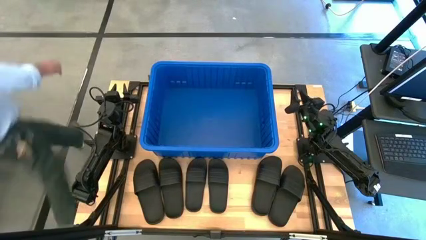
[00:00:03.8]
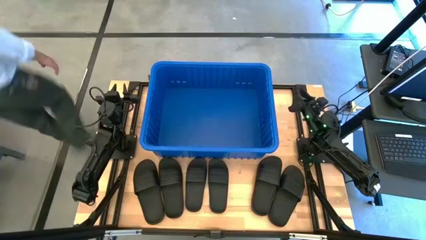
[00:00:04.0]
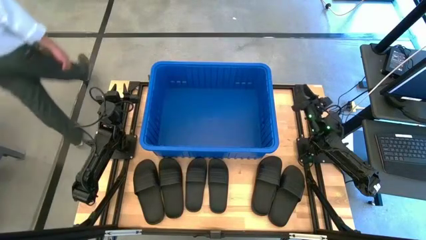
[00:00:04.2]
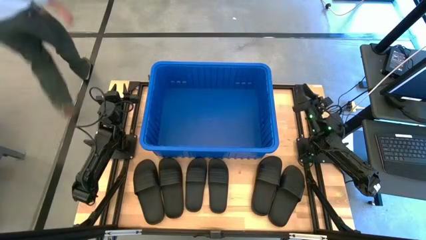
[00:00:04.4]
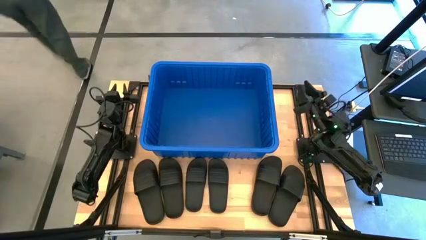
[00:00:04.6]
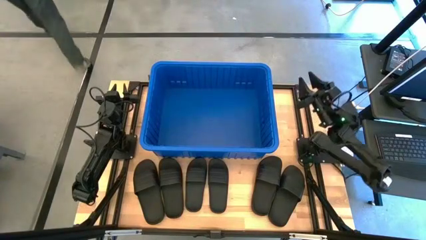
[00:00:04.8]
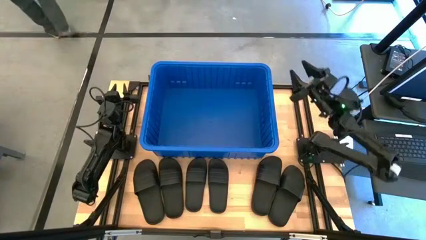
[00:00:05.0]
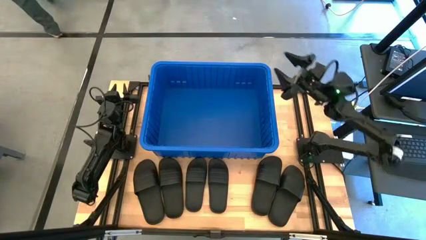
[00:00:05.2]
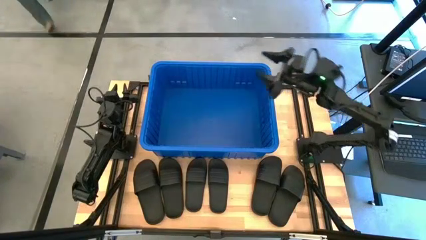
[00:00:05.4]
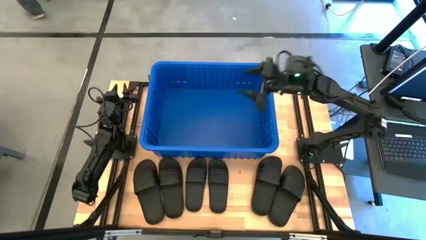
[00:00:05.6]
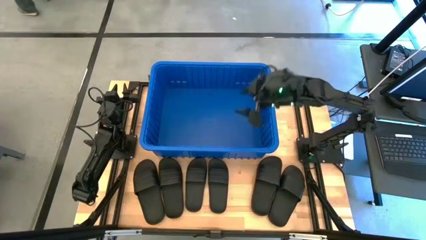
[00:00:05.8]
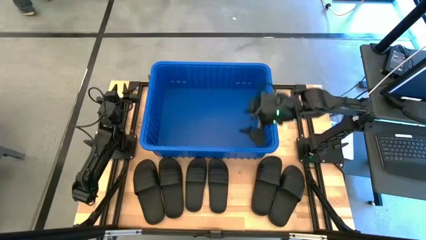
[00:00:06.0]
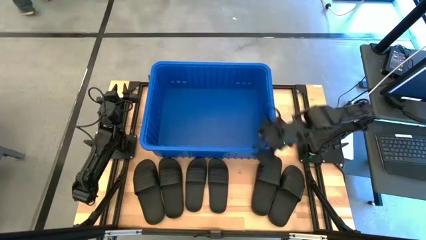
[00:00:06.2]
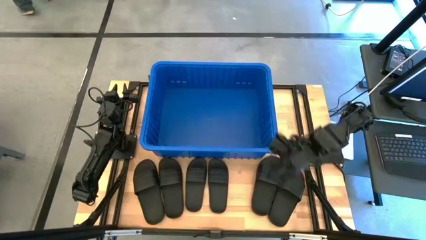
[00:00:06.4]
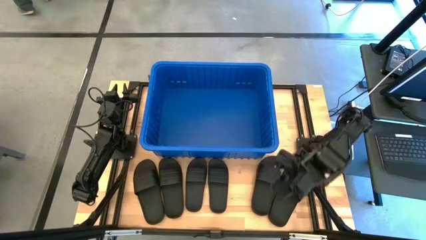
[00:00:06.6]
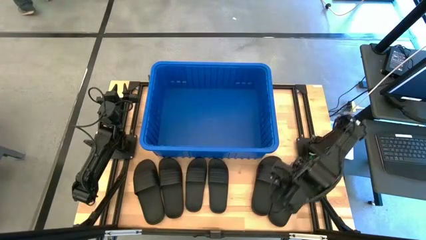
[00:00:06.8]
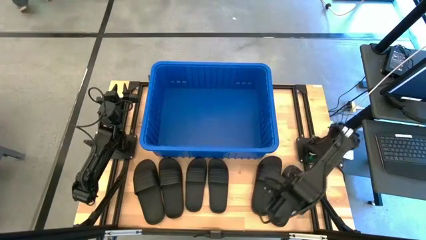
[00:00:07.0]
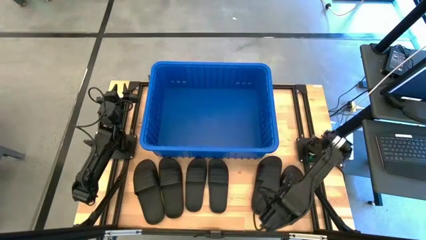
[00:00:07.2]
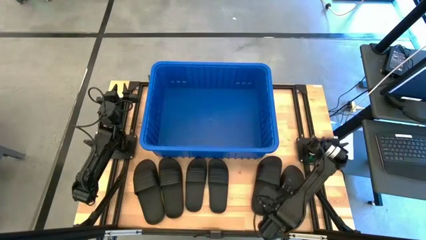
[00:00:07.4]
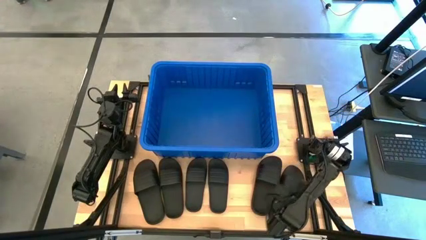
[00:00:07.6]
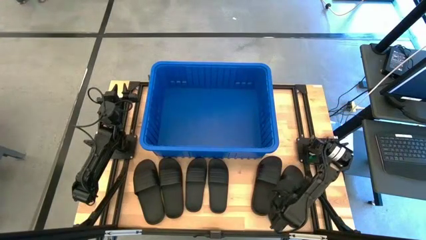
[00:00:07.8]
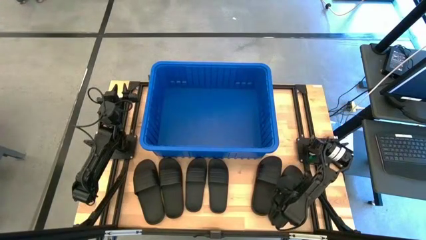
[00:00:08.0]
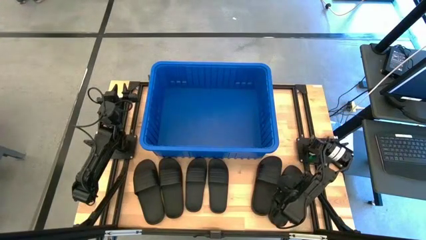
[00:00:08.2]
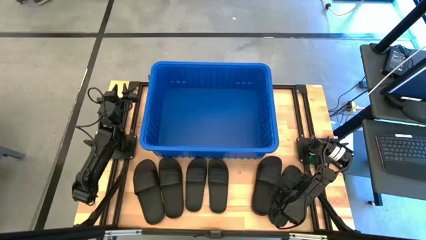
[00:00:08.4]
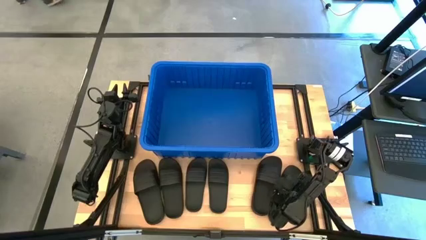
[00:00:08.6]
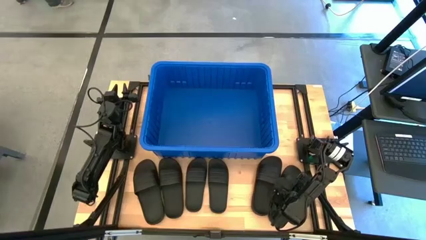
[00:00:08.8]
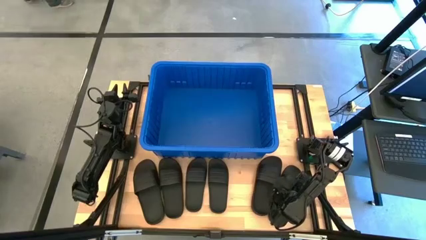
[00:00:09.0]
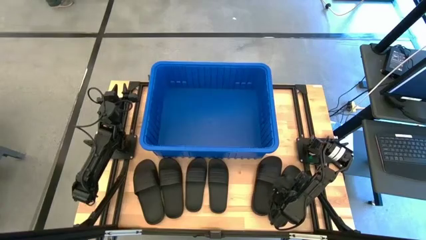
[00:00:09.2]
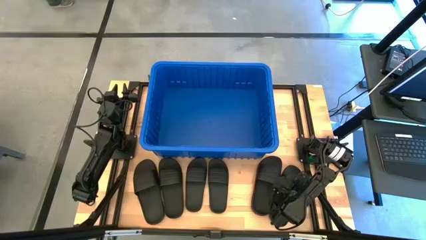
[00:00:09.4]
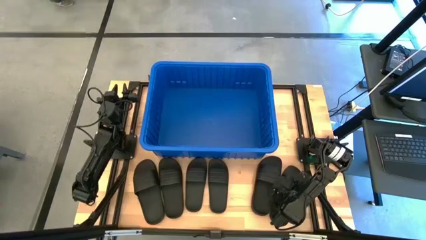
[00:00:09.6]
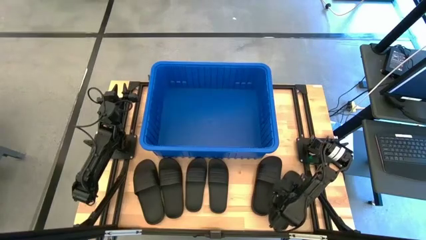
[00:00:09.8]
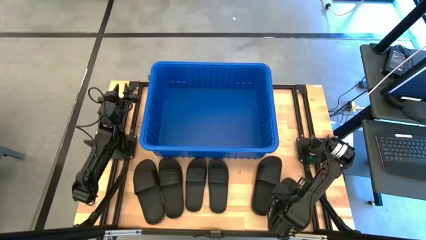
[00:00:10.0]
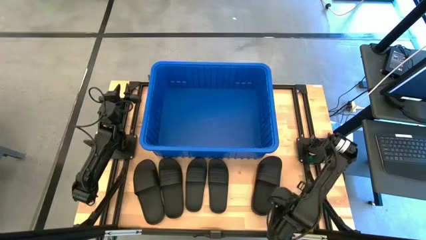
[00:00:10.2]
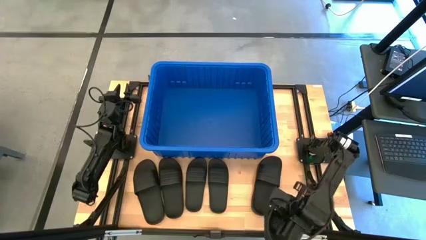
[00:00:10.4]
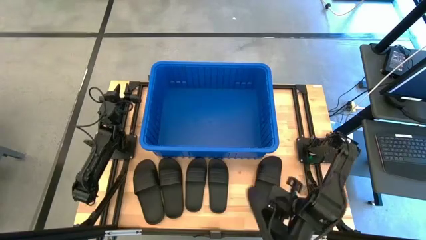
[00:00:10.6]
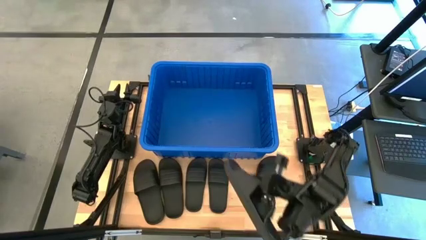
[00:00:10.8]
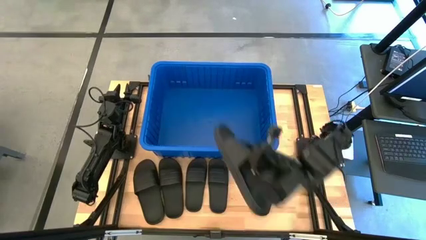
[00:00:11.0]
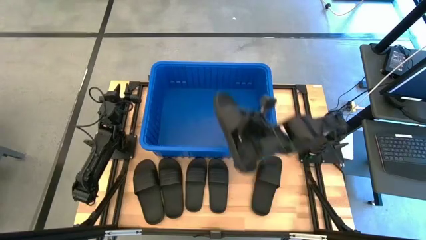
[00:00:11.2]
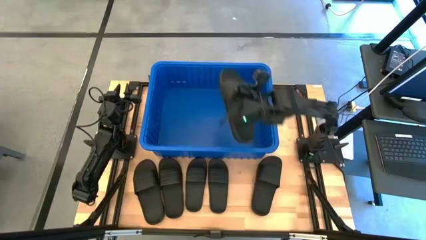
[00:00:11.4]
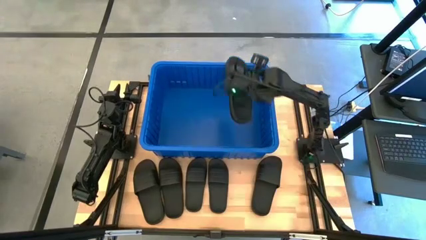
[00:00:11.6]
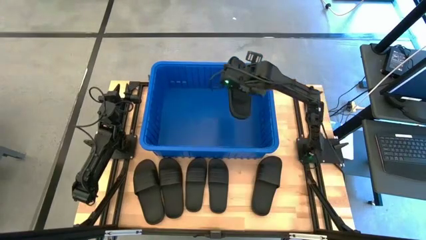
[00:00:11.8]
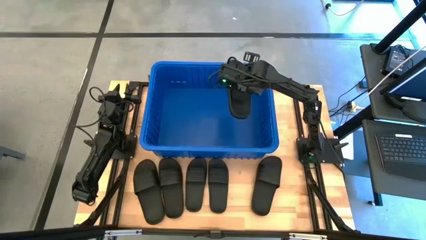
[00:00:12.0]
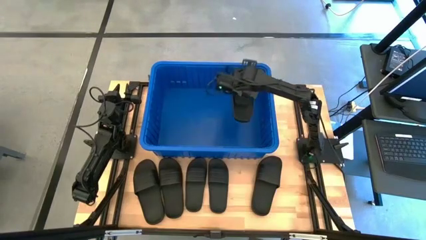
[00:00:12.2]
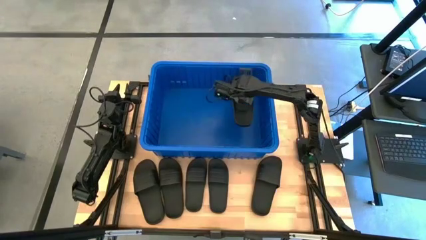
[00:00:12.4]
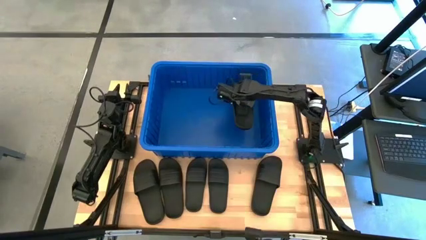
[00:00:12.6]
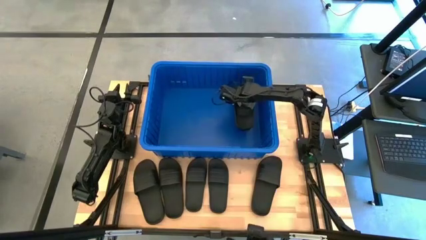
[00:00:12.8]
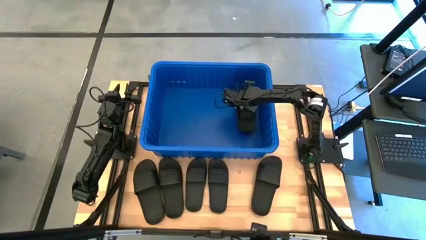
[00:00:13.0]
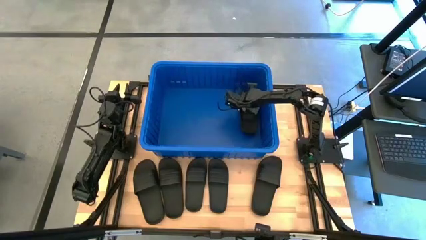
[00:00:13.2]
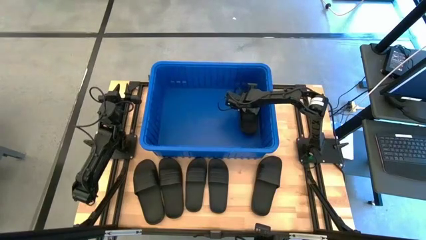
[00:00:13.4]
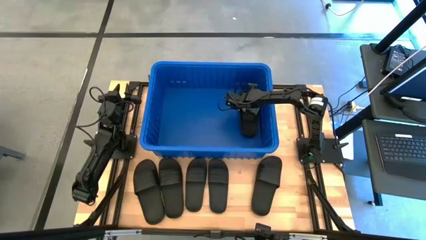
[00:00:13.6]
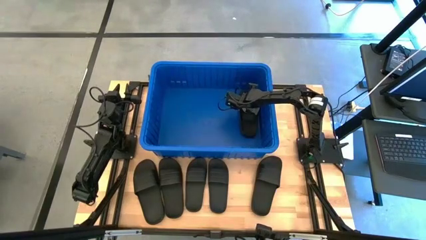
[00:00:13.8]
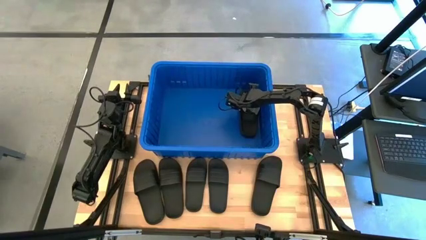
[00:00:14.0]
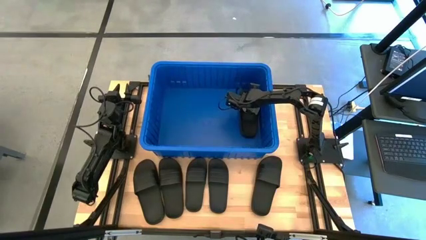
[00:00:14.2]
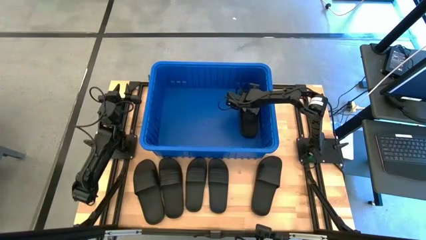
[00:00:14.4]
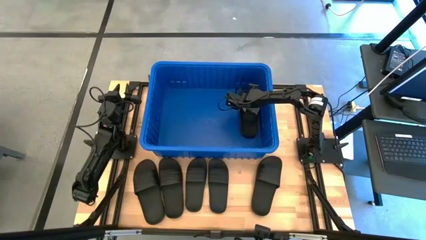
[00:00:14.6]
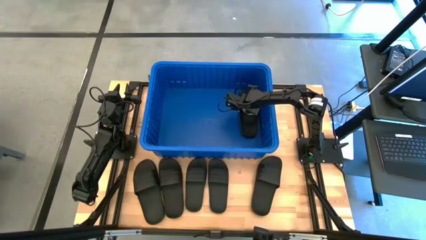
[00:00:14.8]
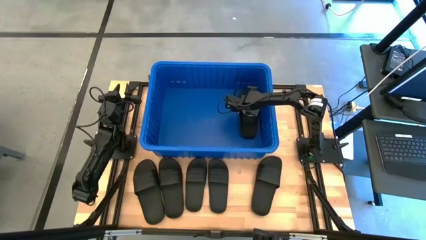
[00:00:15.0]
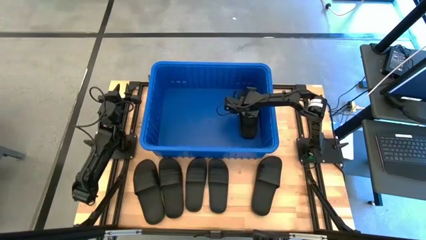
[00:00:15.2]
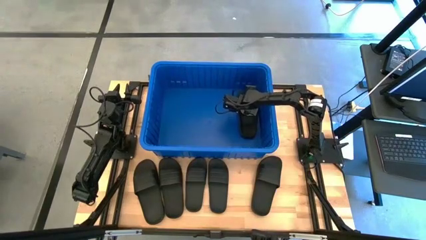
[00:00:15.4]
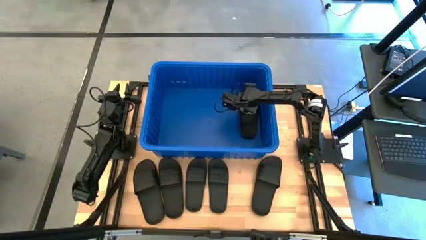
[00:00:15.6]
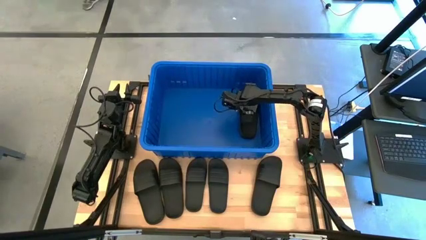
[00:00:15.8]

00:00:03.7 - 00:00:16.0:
Task: Pick and place slides into bin
Put the black slides into the blue organizer bin
